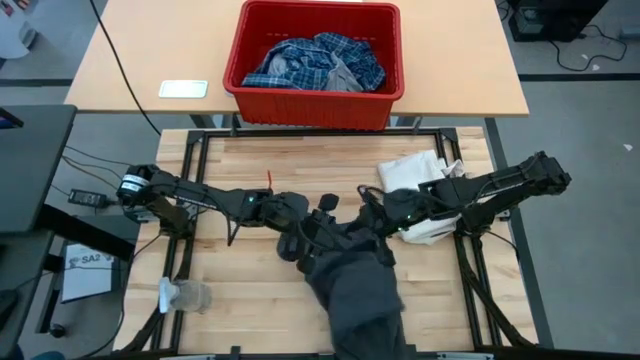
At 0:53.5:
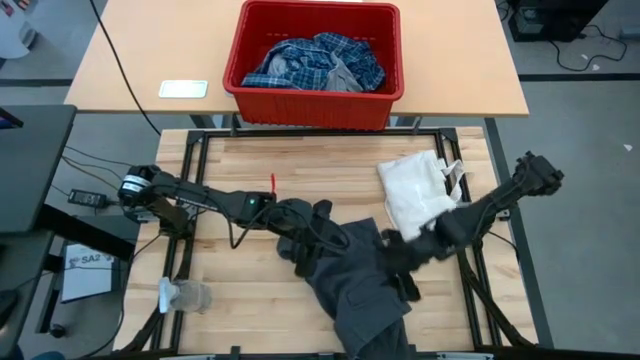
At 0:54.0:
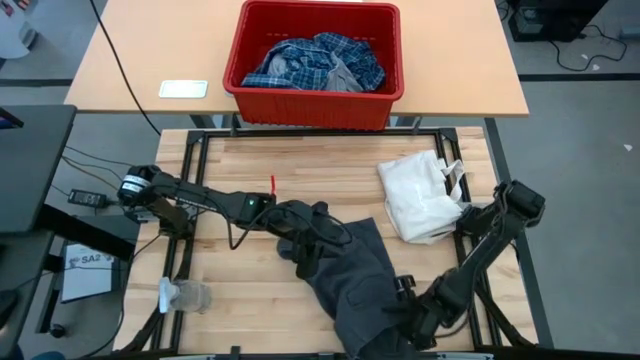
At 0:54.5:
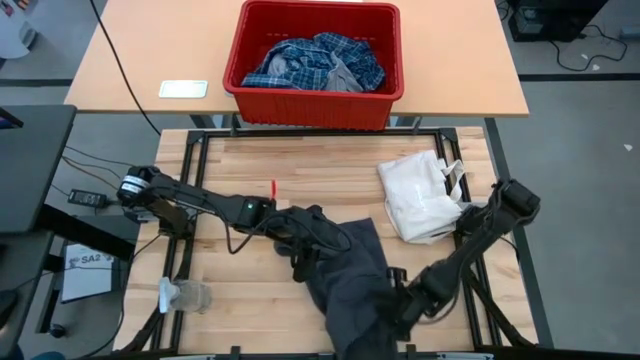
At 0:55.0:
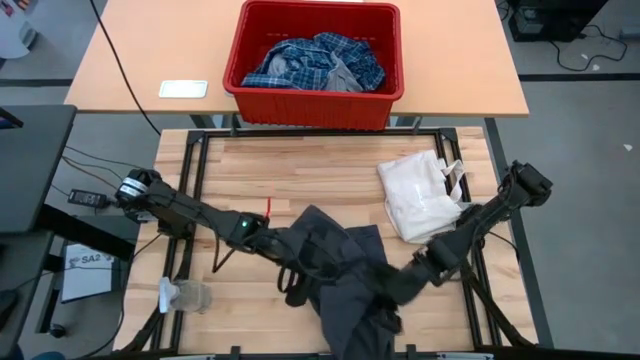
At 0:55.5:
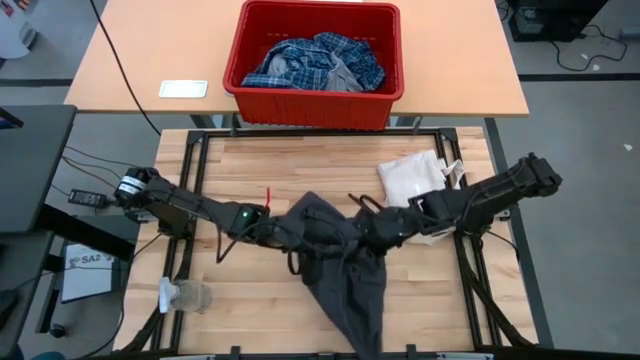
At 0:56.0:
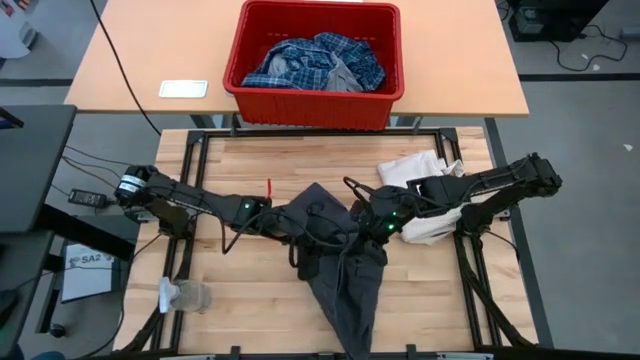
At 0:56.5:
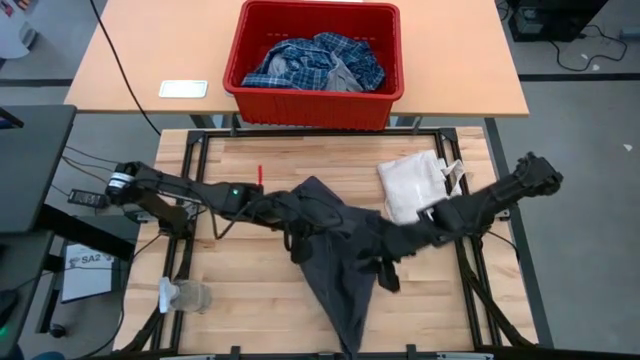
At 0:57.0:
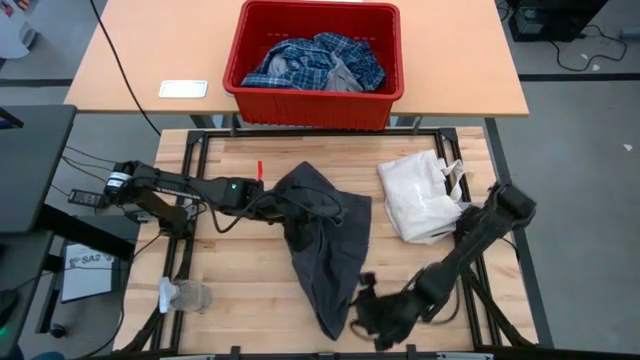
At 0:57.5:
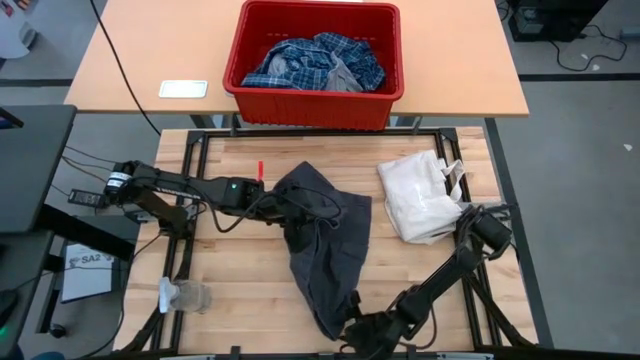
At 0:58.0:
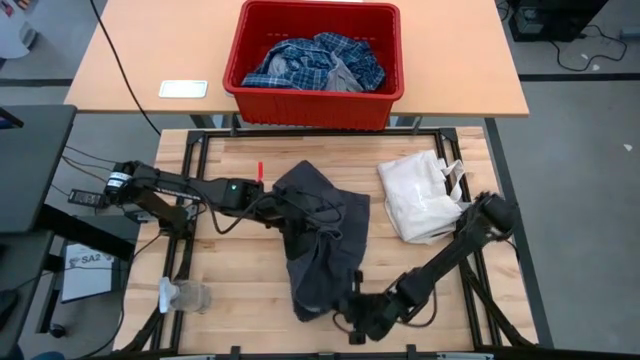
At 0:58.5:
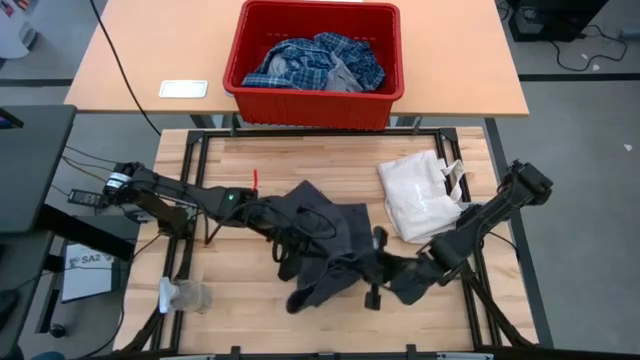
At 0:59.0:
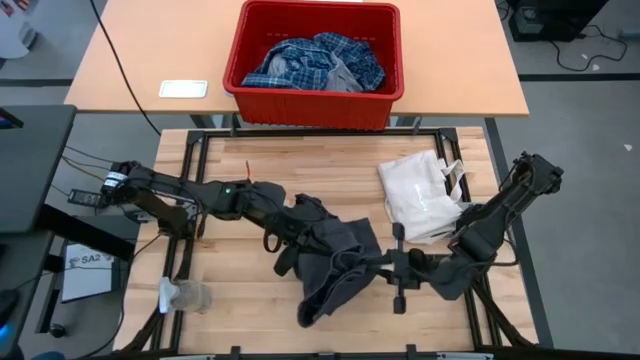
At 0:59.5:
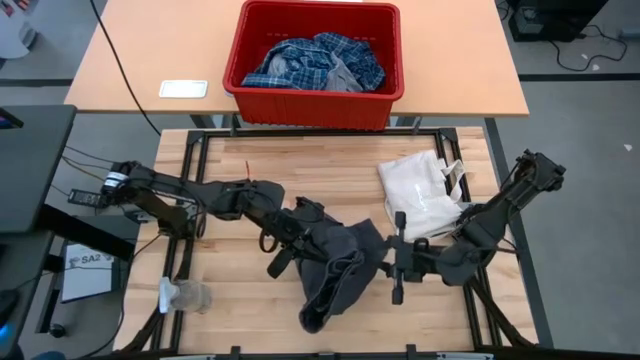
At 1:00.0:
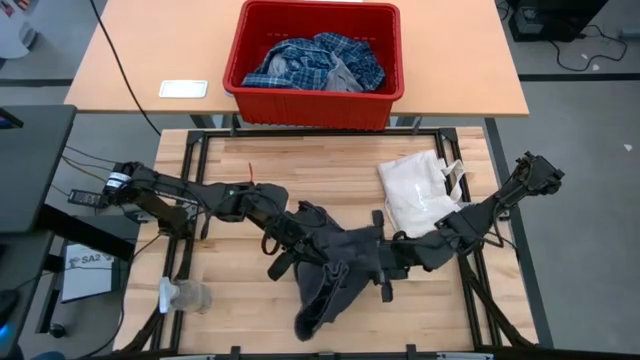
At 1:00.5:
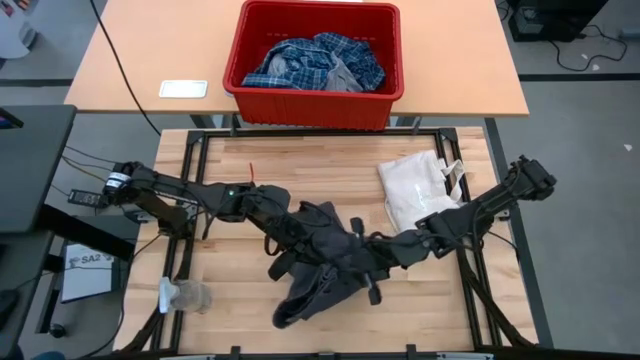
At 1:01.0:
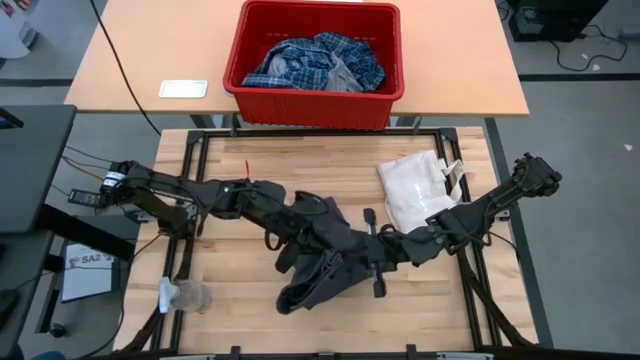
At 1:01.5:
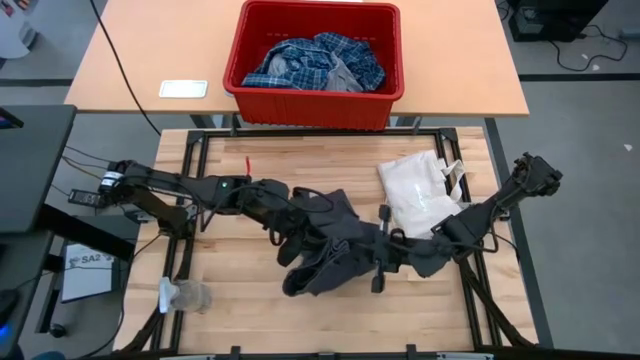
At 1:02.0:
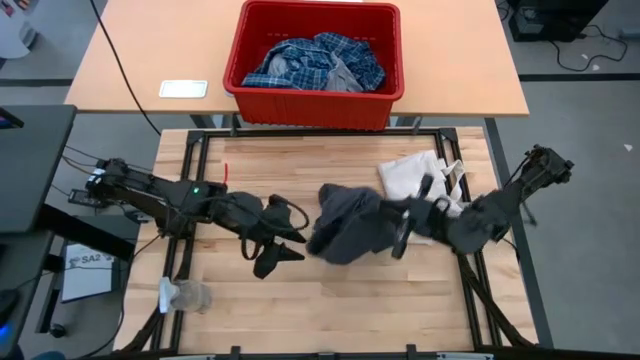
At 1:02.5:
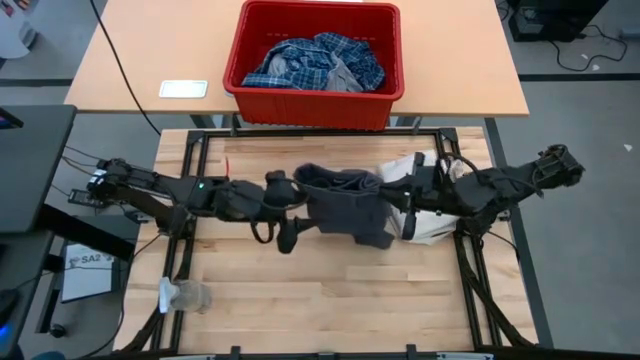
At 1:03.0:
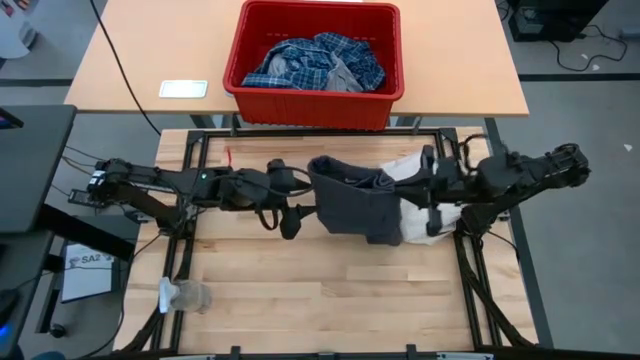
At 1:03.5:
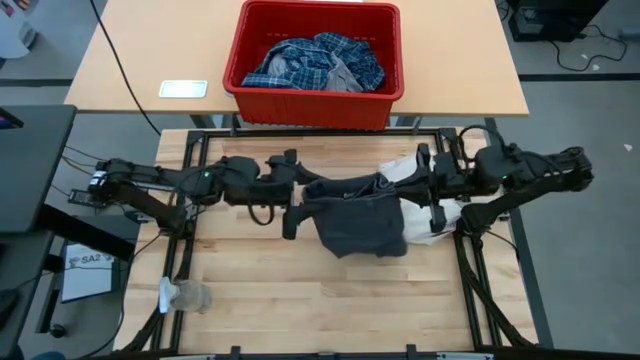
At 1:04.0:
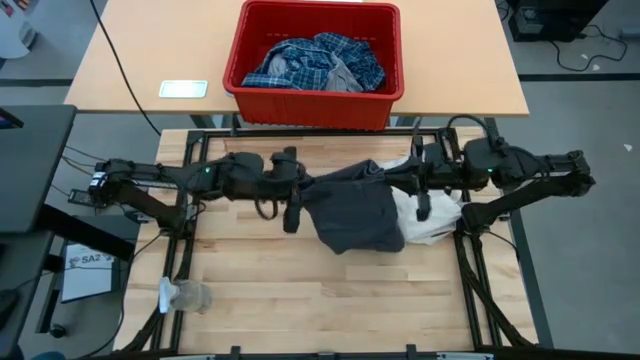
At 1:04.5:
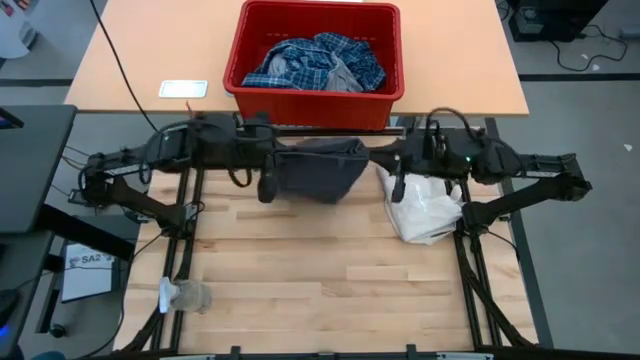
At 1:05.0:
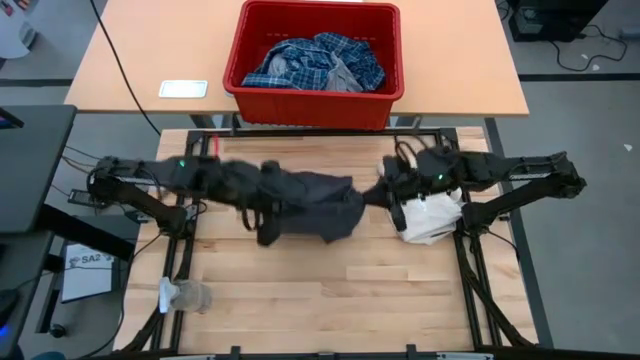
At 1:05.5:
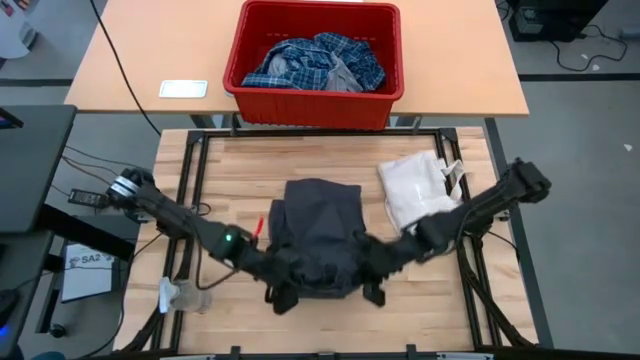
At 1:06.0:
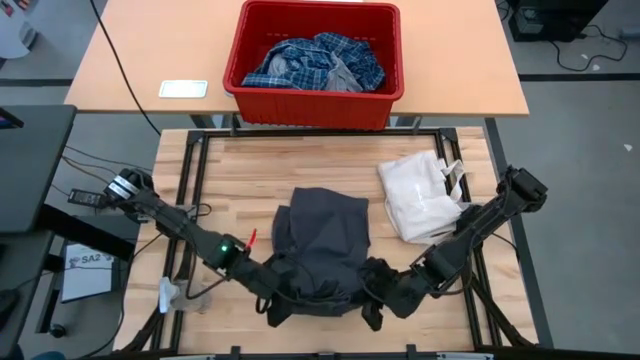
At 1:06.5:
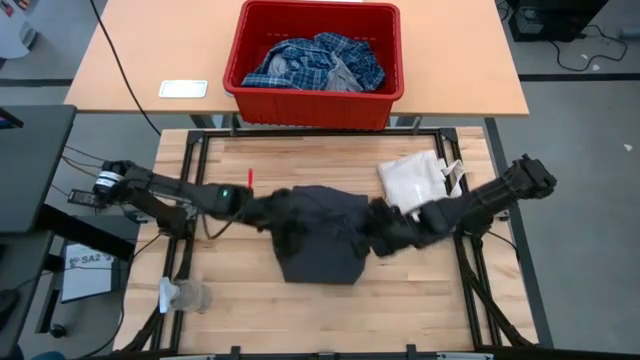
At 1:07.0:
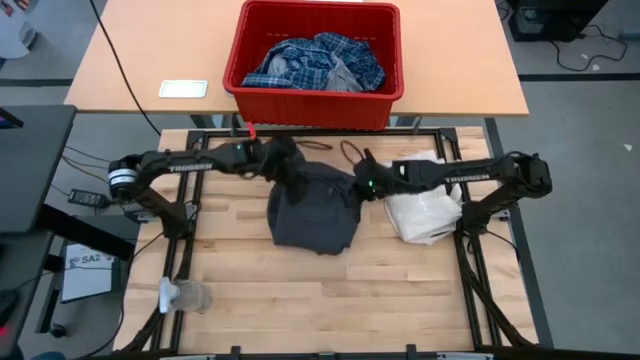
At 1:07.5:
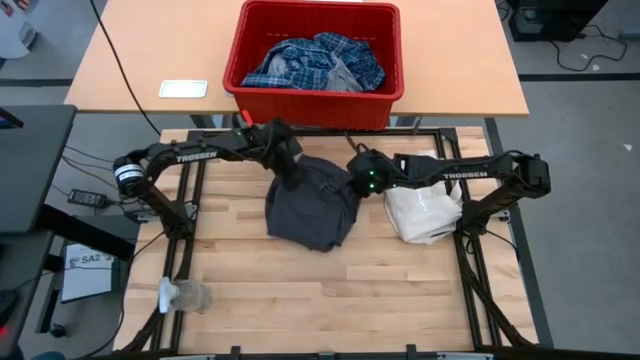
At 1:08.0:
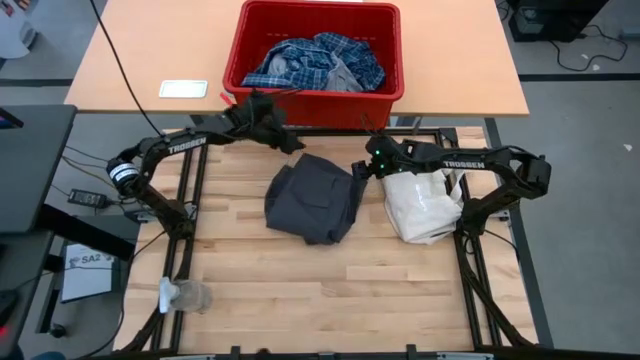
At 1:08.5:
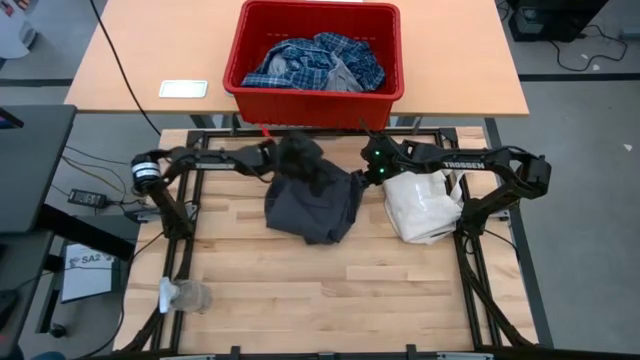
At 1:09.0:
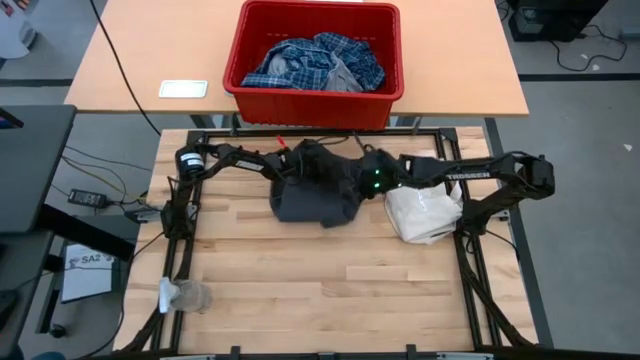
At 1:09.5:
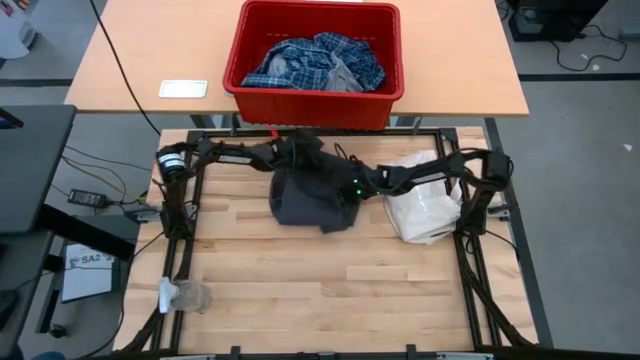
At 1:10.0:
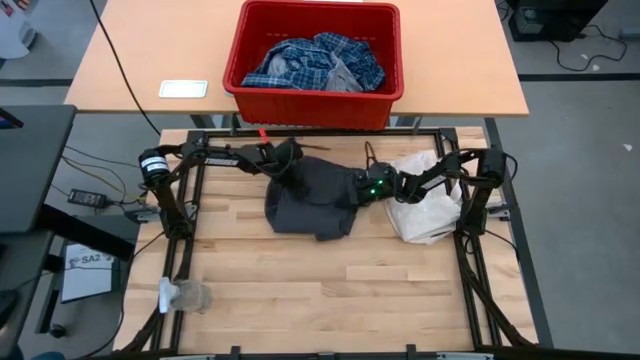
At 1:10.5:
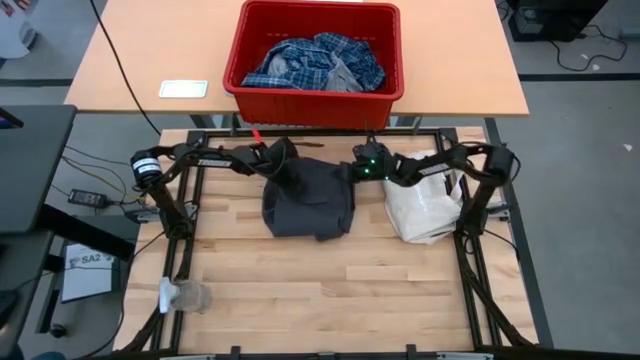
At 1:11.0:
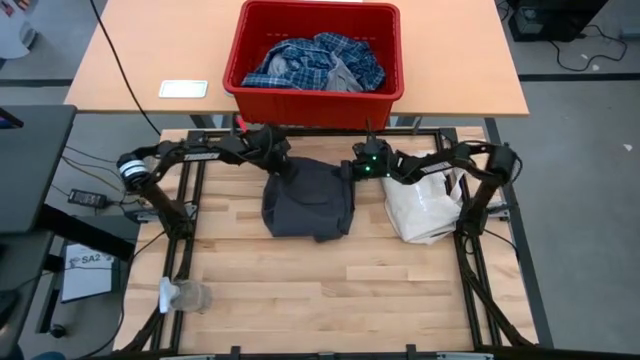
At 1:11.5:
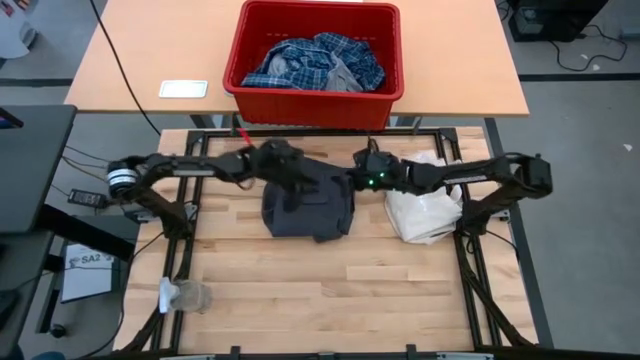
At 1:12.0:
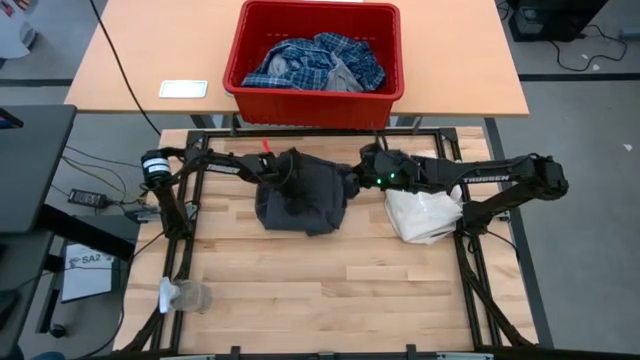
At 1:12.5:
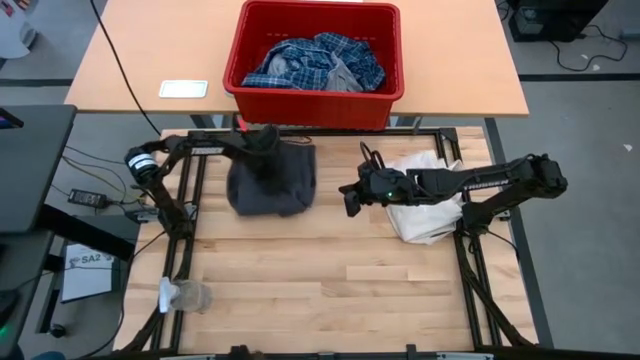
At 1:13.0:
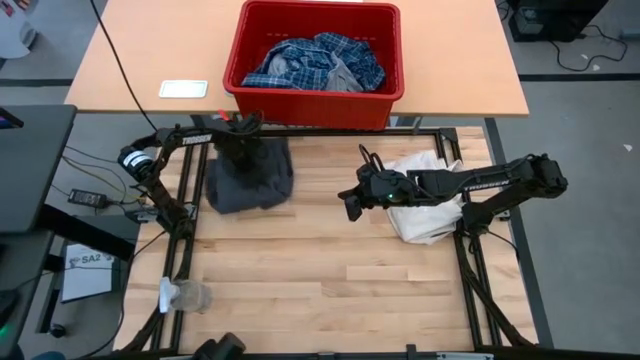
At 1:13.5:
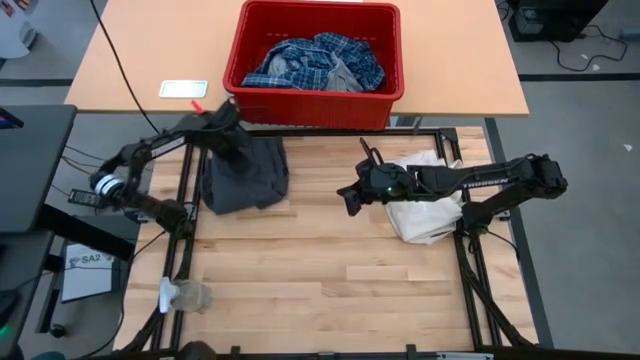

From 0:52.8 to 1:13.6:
Task: Fold Laundry from Bin
Fold the black shorts
